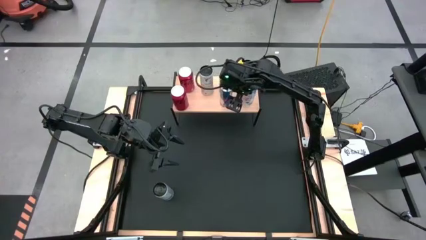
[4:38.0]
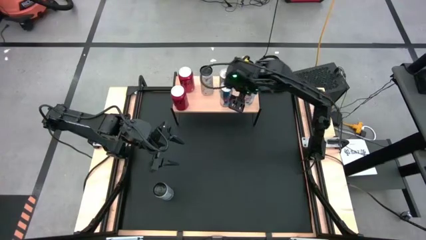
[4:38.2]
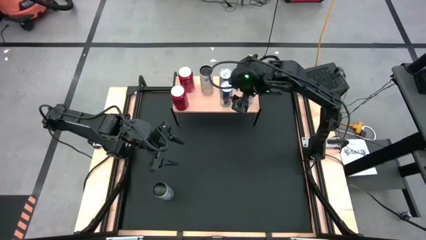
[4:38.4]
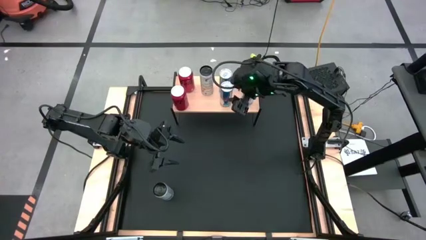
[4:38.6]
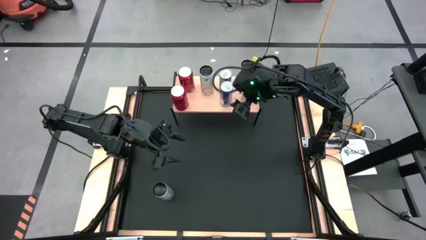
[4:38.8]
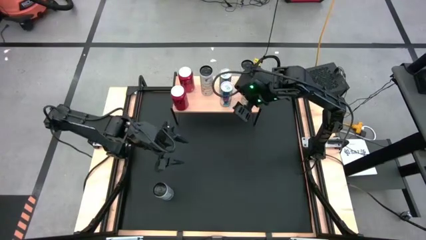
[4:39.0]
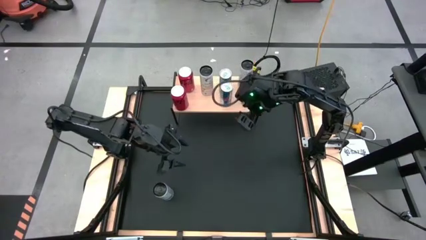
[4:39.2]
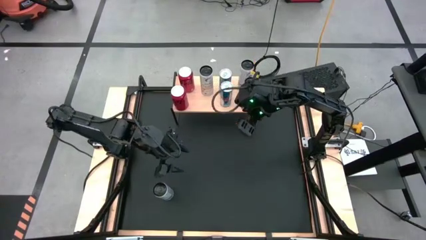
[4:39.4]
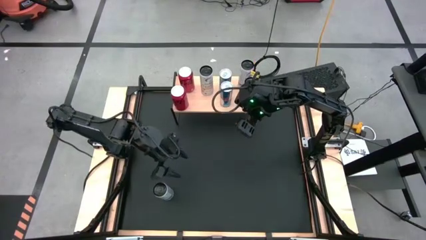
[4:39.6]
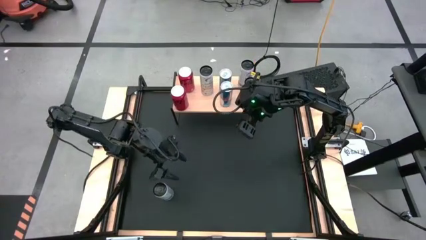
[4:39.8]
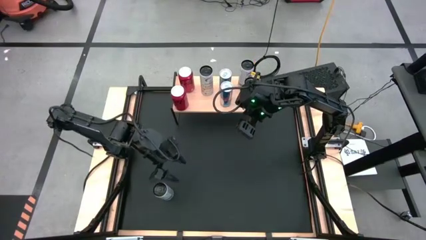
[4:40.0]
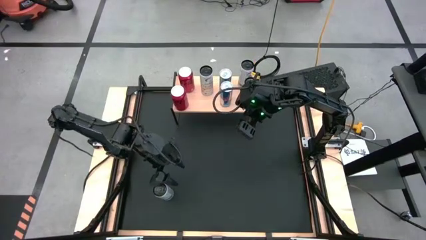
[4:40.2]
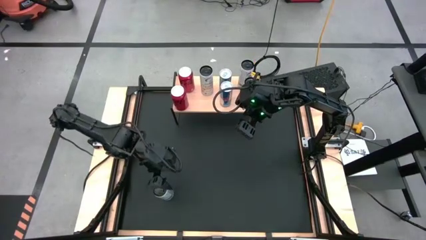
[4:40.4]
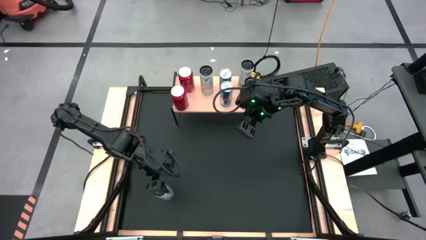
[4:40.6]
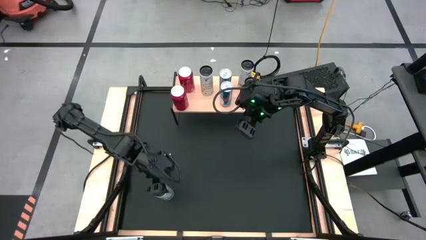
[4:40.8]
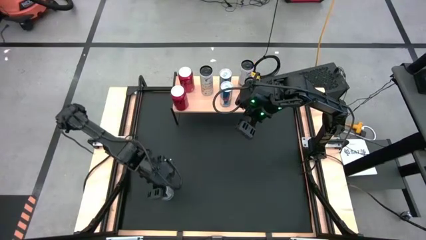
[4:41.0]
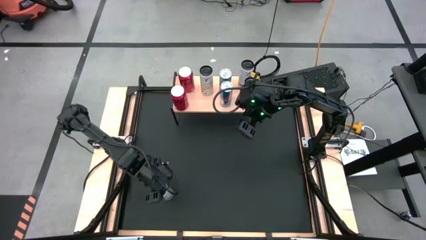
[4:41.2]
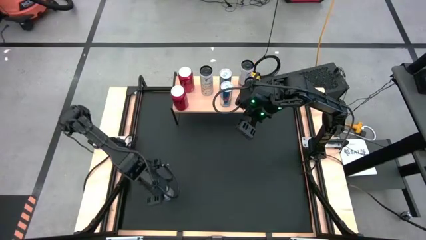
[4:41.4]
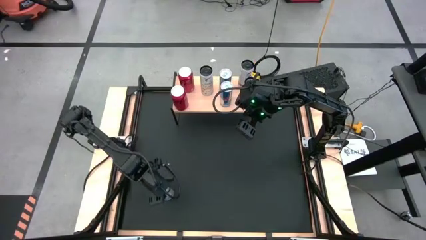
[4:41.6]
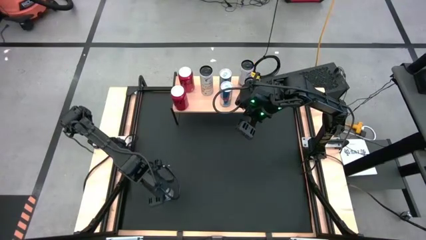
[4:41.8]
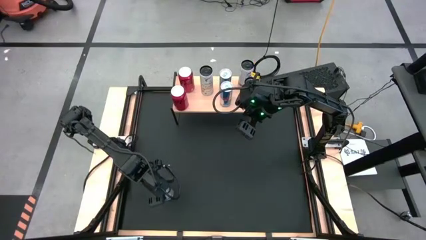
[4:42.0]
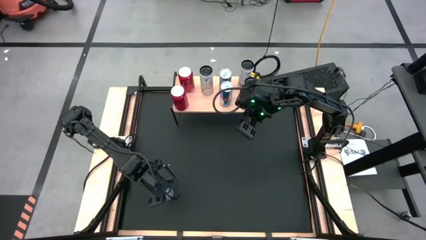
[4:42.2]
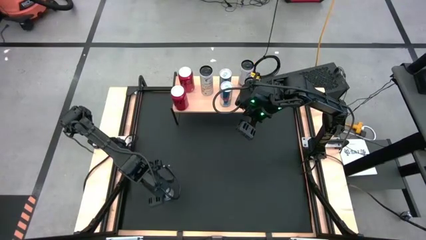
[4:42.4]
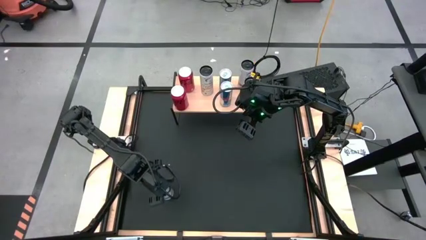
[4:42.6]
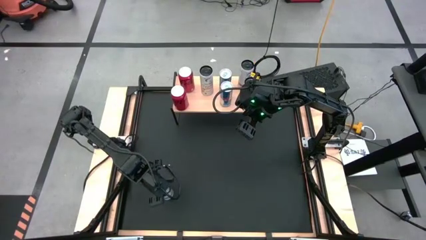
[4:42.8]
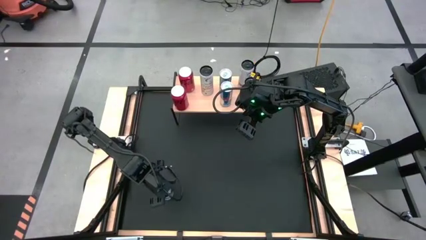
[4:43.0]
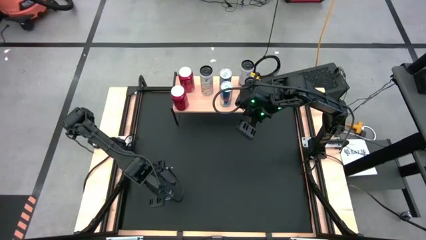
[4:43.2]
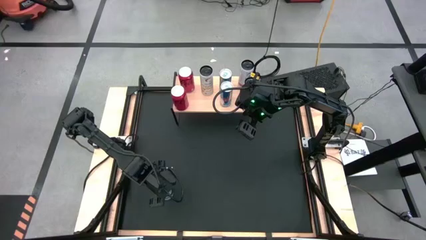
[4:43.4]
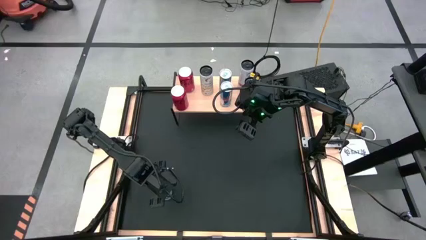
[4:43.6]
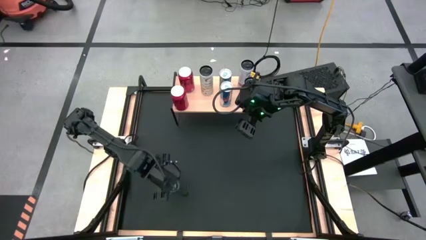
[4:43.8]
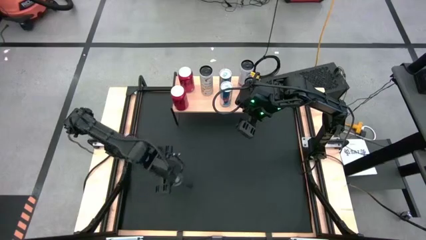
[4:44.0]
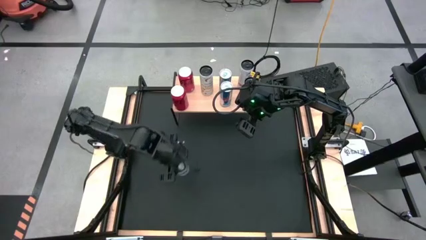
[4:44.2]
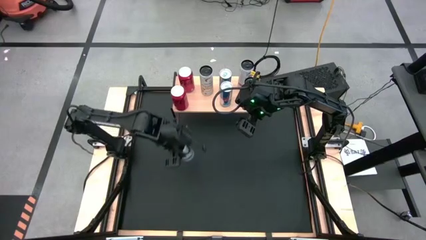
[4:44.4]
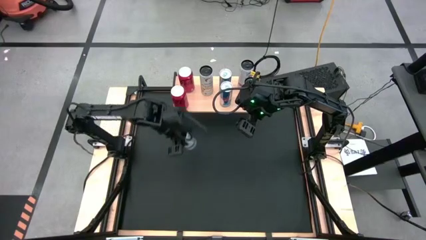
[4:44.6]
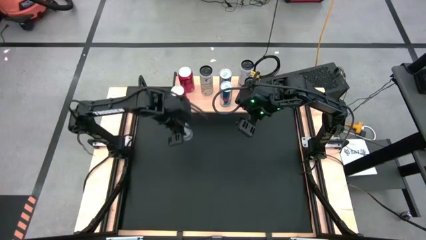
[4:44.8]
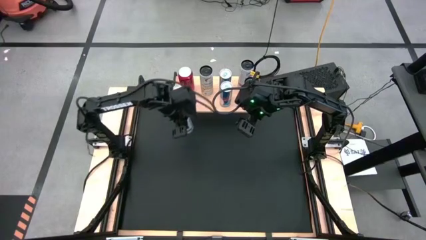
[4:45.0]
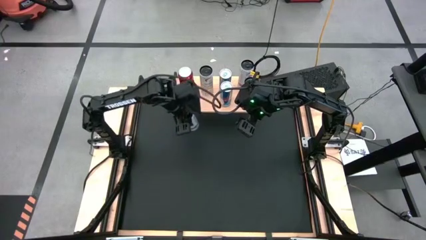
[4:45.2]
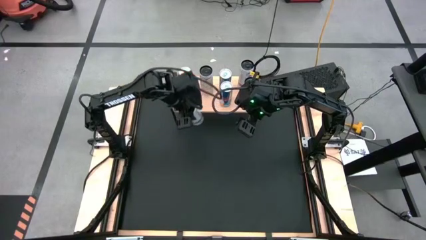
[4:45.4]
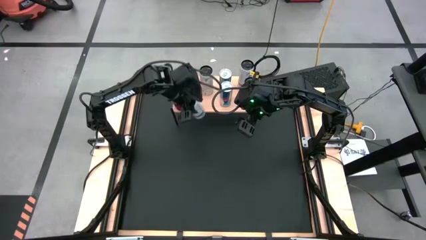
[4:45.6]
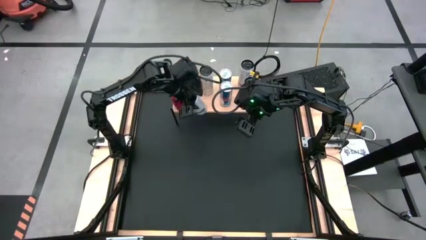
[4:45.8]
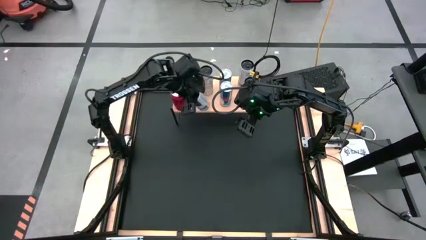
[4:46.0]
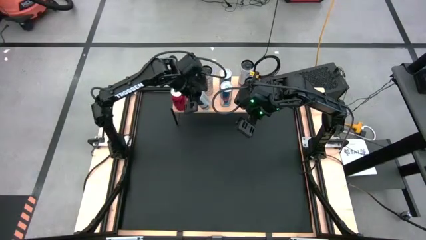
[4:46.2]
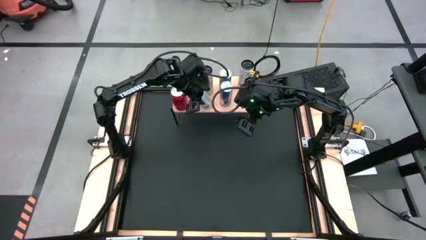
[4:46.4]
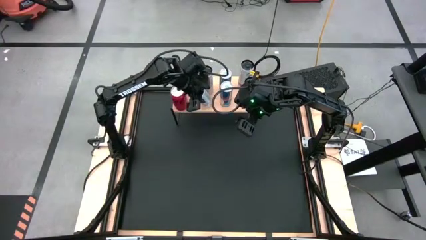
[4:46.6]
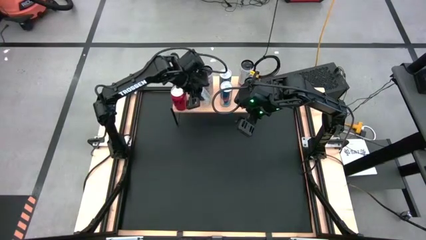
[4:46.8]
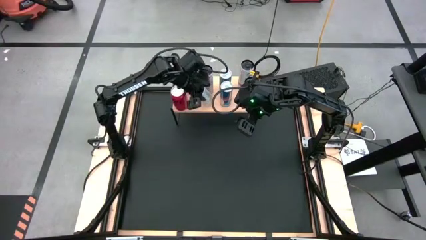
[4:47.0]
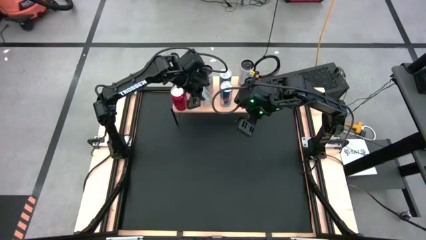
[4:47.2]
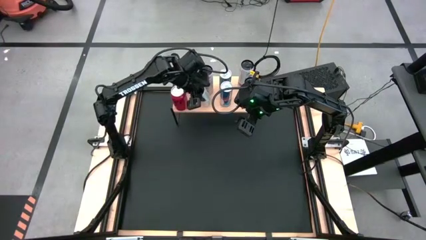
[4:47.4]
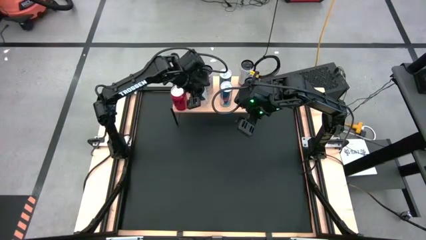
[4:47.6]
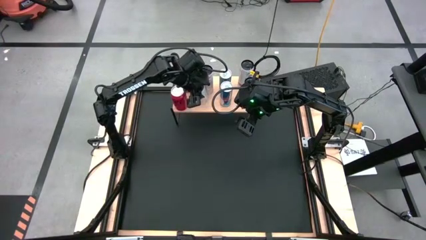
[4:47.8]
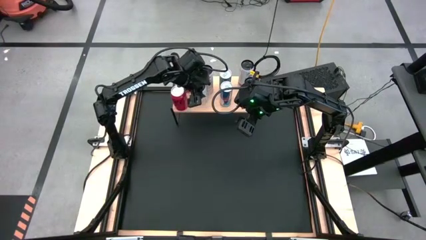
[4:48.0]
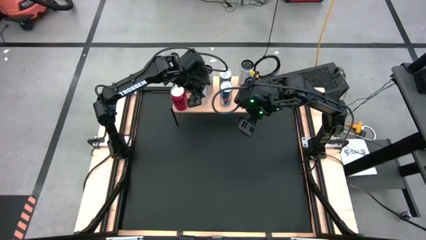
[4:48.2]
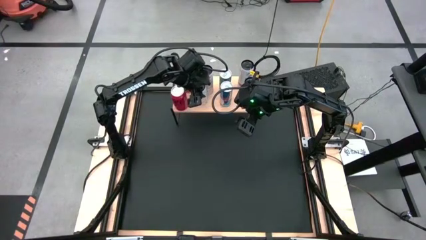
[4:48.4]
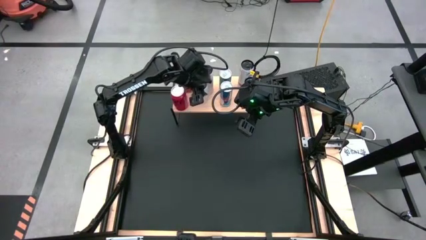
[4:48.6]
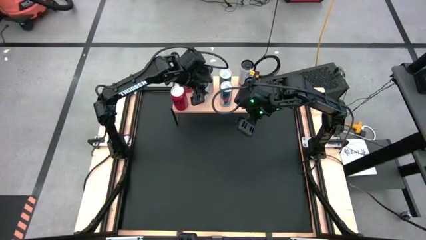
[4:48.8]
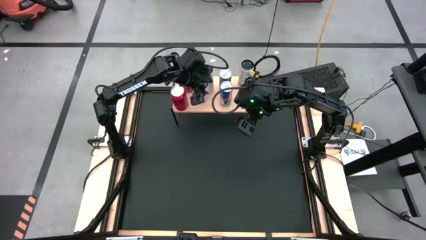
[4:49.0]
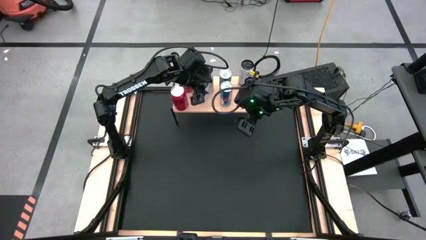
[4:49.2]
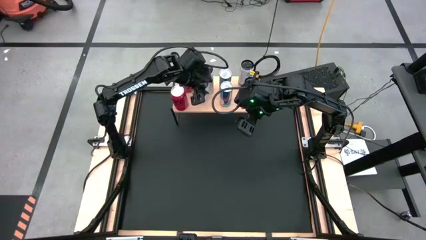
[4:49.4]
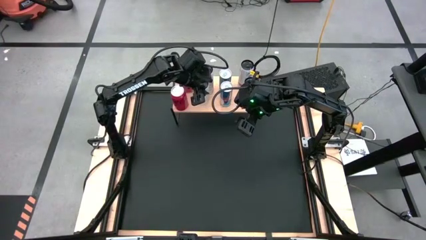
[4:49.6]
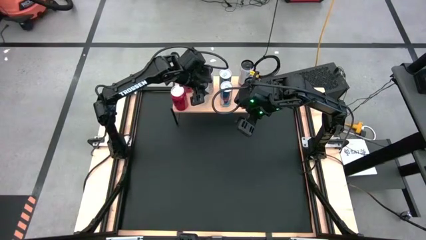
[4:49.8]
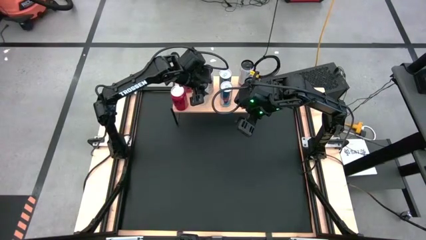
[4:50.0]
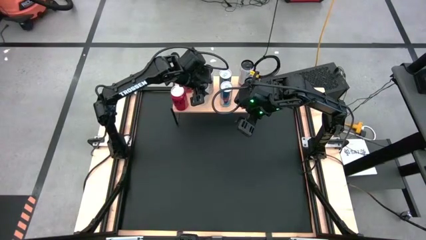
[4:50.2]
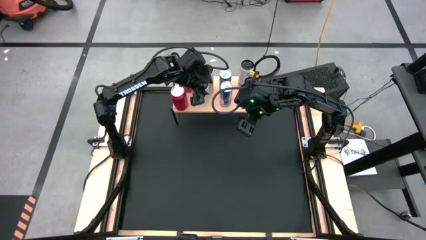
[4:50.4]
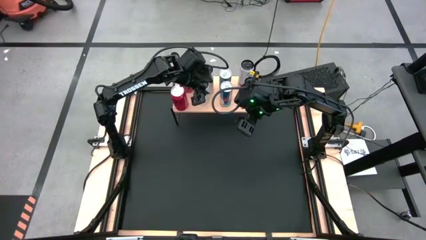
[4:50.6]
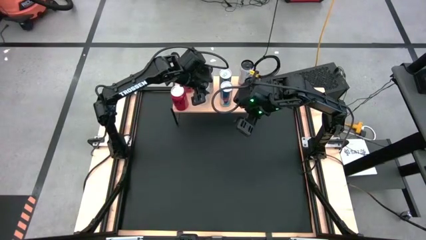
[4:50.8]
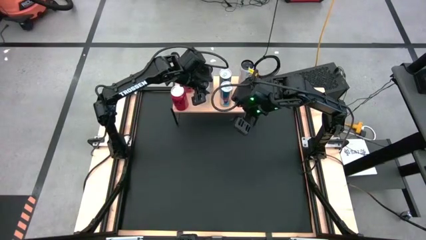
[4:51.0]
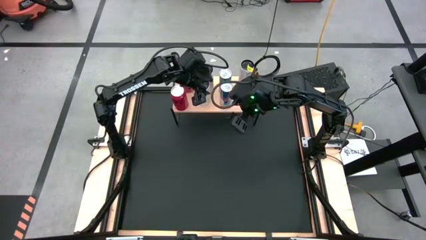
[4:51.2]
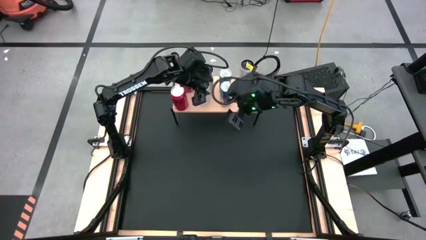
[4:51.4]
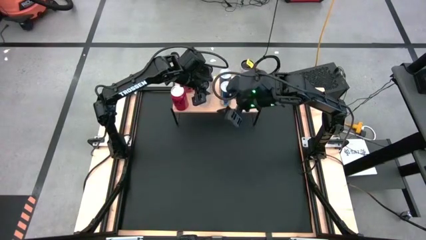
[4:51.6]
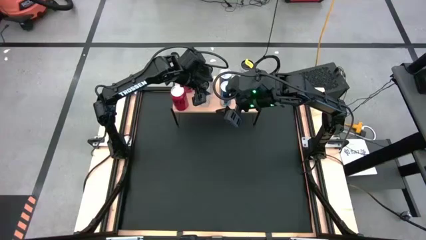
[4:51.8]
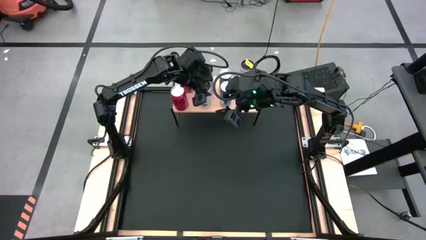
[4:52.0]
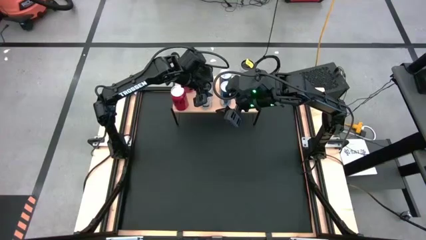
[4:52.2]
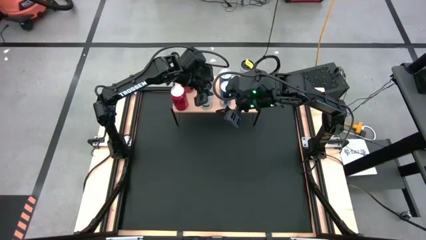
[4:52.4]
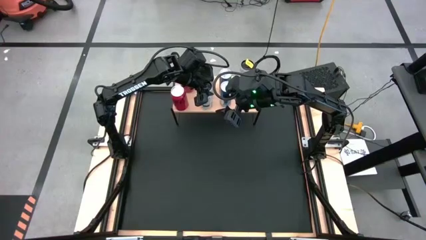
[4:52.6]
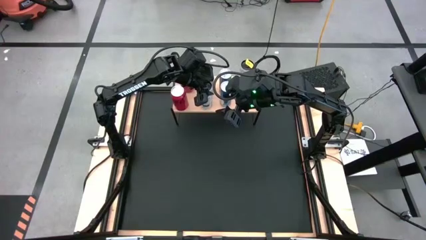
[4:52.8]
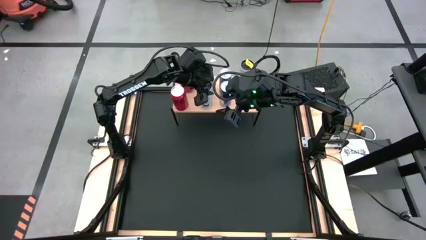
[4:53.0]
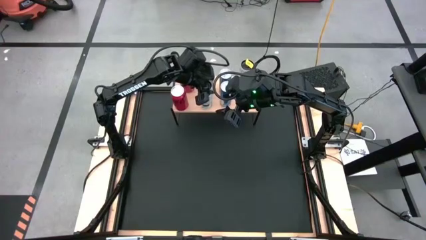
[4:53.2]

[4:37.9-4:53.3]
Task: Place canned beverage on shelf
Put the white yellow soda can on the shelf aligned with the other white yellow soda can
